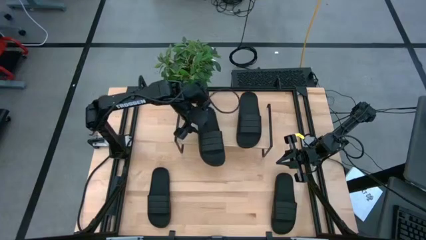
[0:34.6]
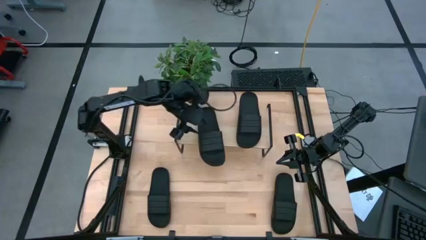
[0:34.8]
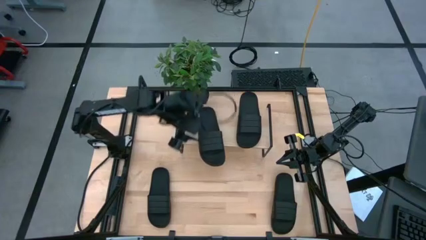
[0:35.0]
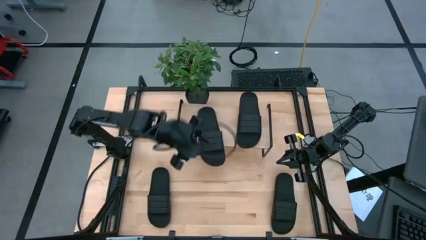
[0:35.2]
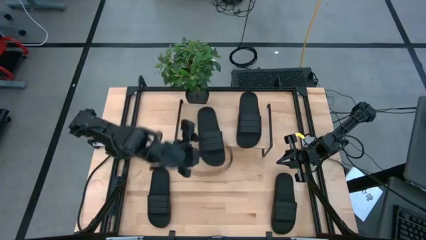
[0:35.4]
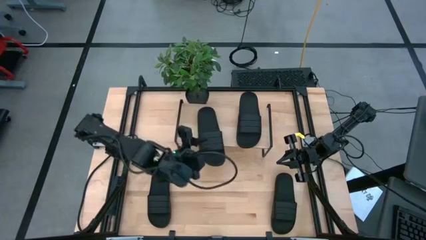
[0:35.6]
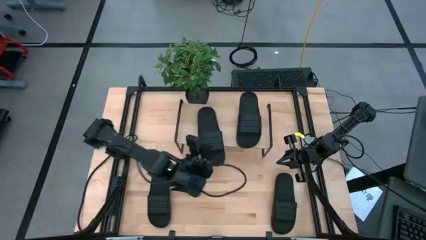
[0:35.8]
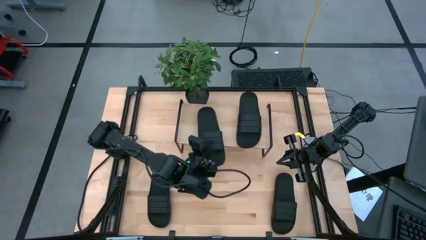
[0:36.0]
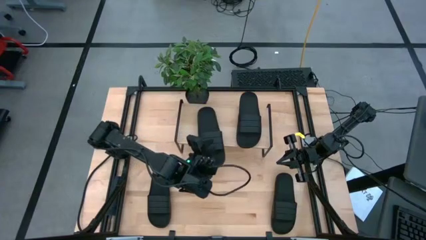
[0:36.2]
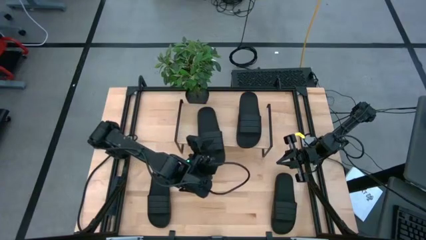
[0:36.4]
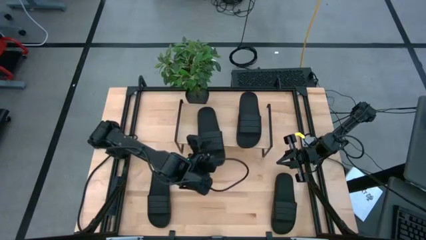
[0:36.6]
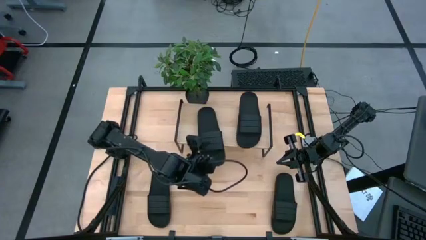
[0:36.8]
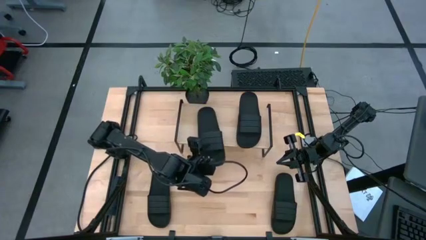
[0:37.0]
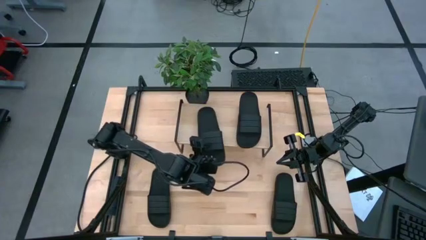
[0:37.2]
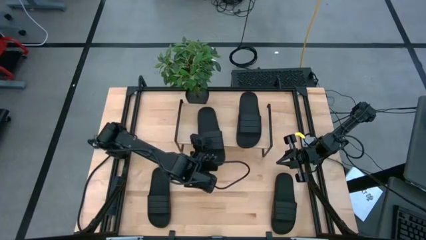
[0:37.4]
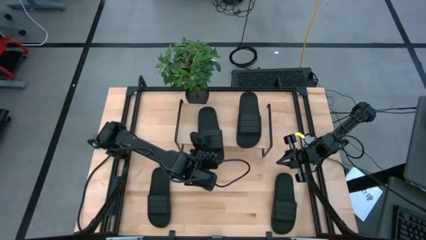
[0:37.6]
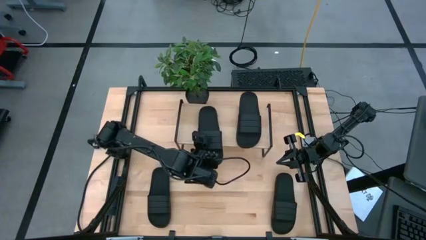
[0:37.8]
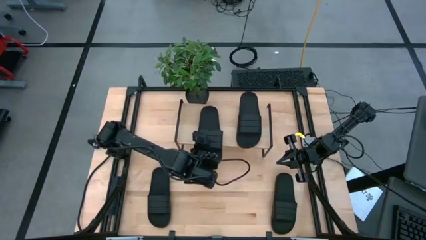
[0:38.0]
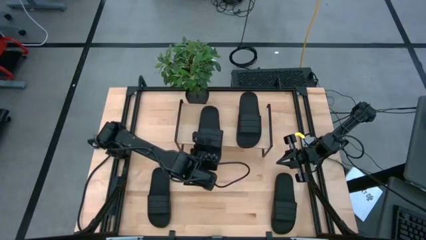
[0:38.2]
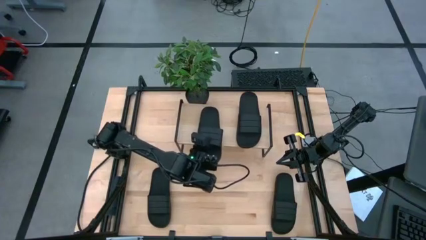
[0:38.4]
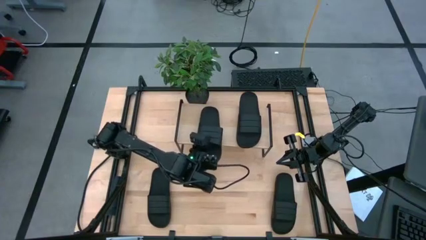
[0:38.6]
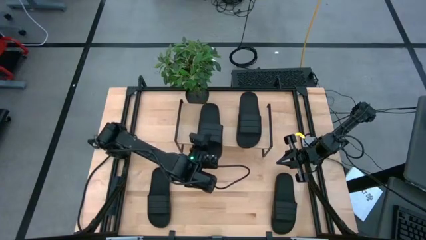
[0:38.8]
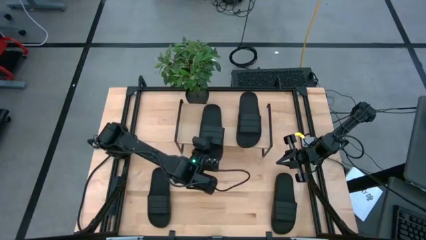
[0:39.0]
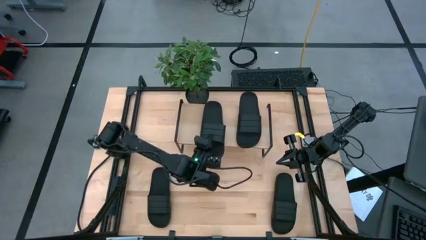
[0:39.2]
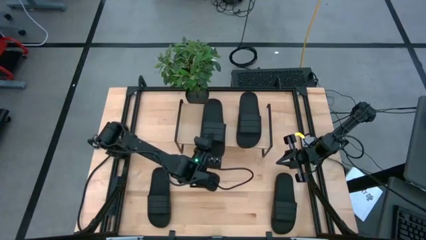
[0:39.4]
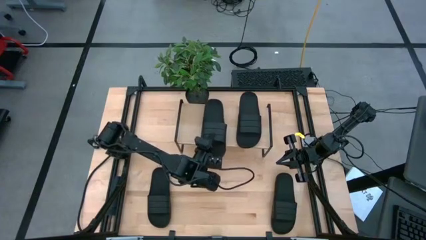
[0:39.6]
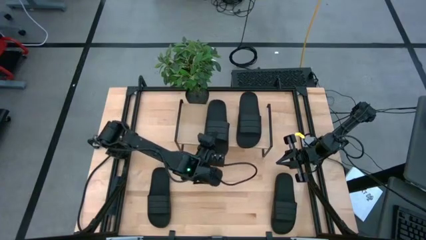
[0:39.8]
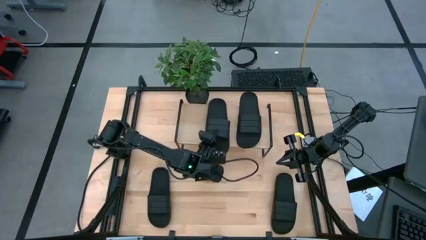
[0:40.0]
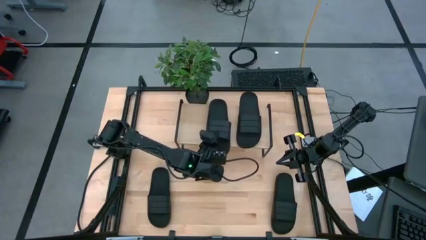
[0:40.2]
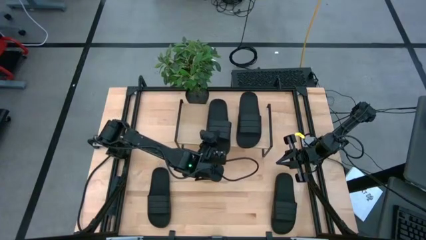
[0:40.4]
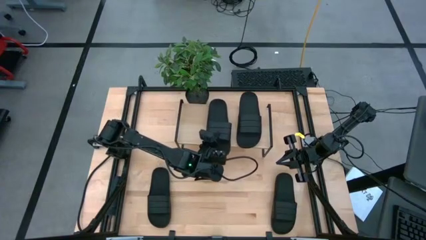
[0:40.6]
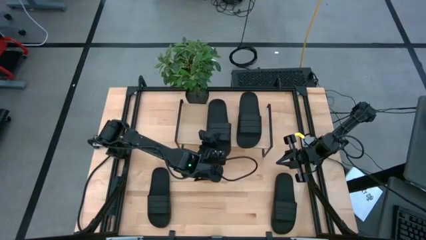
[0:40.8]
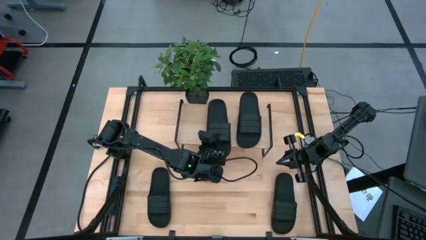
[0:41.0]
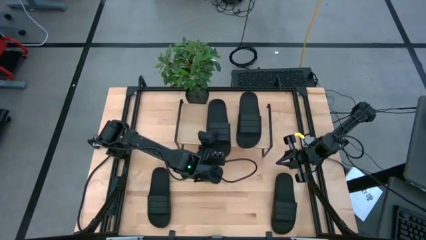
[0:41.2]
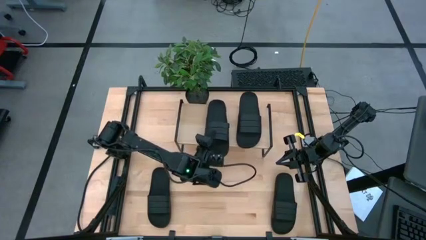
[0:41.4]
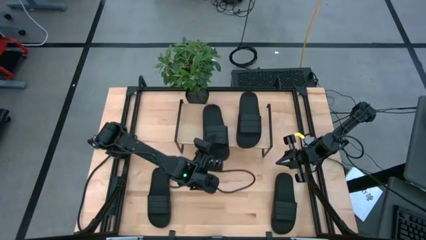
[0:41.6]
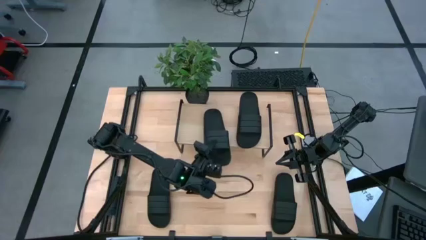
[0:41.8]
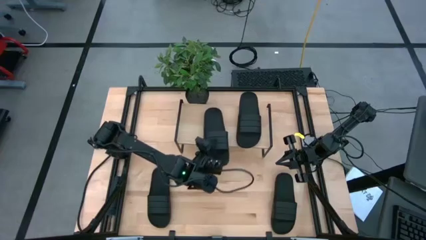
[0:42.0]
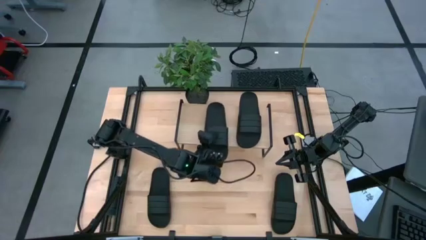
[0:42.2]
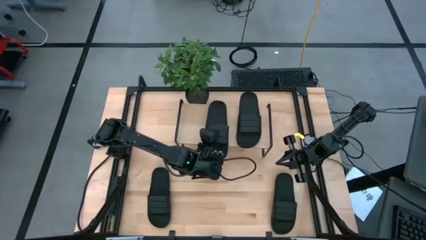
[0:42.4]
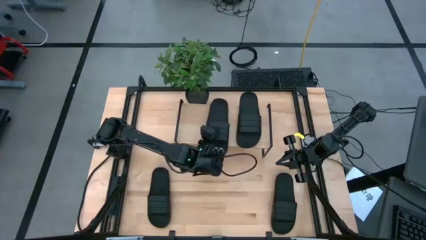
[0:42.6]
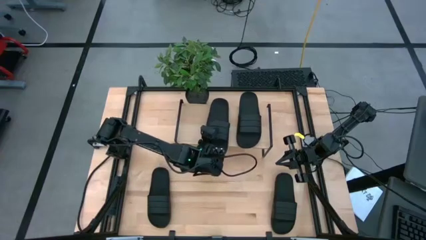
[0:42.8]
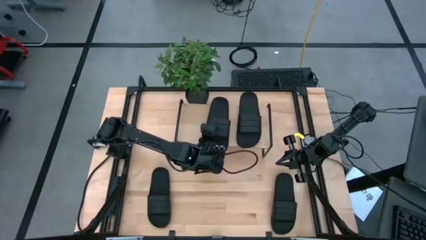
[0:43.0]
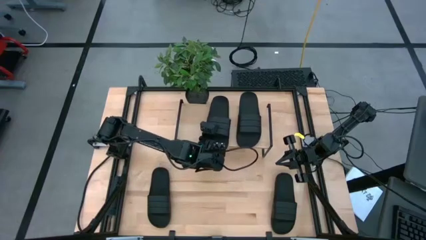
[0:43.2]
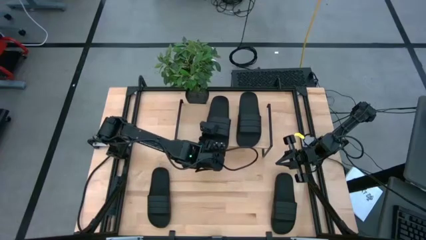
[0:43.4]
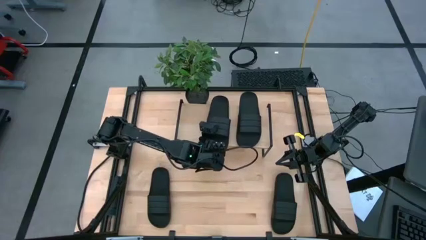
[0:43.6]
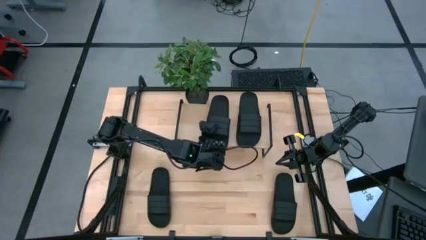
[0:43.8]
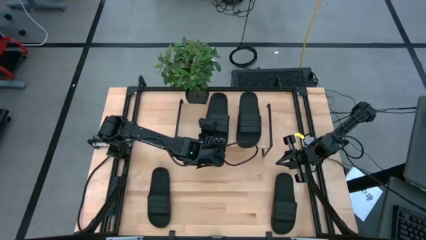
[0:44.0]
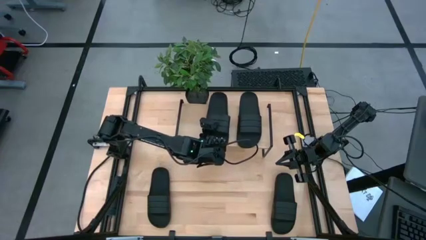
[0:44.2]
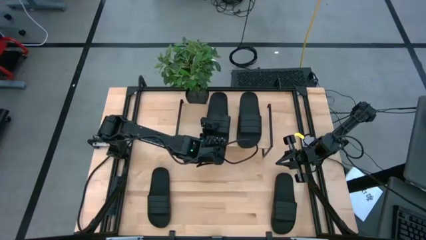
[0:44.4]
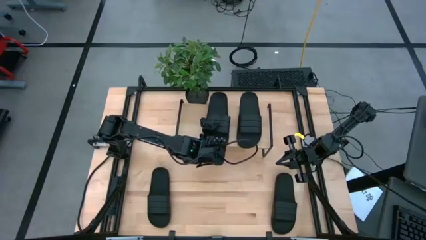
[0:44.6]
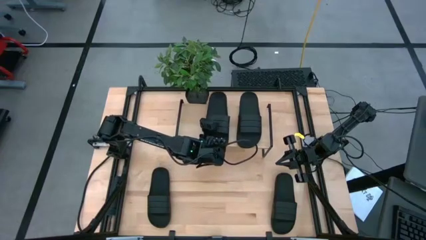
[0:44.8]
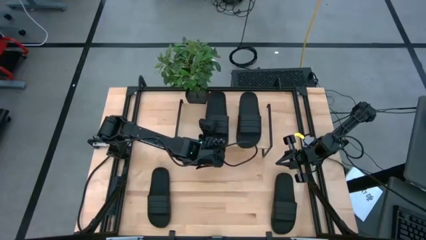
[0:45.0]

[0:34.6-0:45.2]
Task: Pick and place slides into the shelf
Put the middle black slide on the shelf
